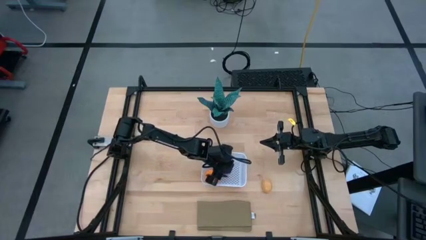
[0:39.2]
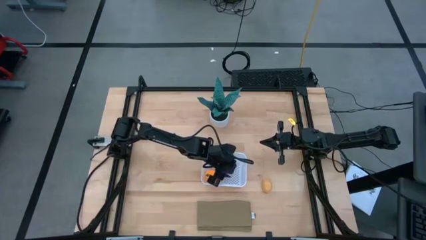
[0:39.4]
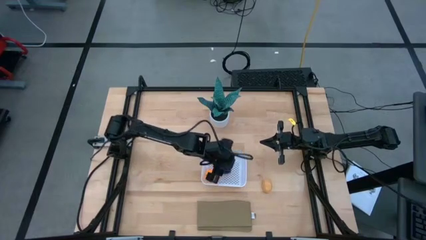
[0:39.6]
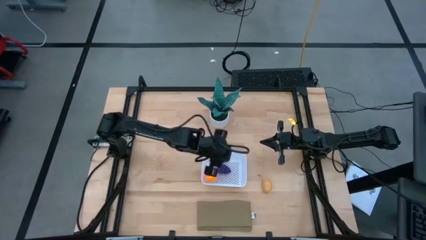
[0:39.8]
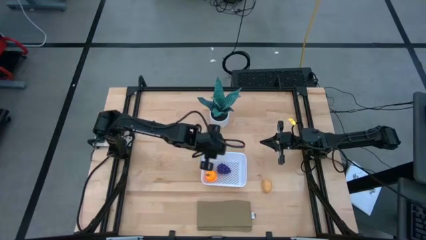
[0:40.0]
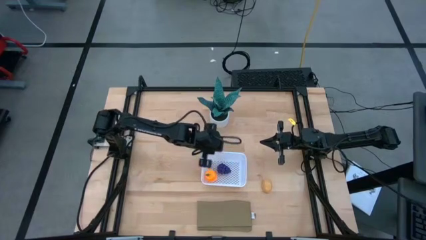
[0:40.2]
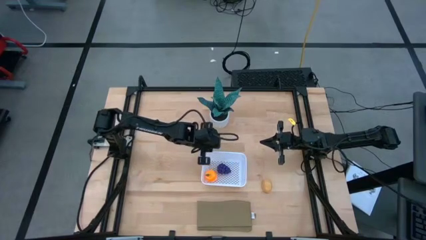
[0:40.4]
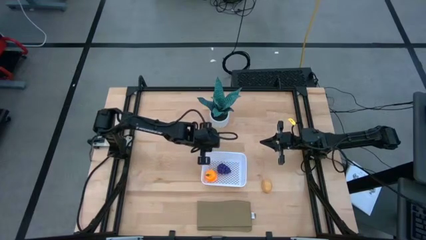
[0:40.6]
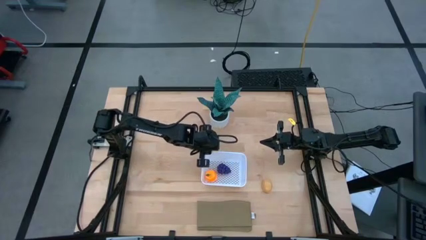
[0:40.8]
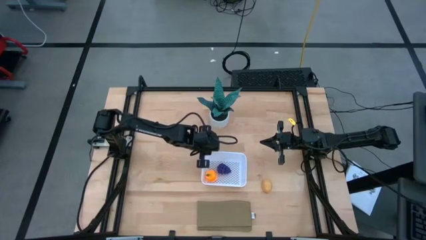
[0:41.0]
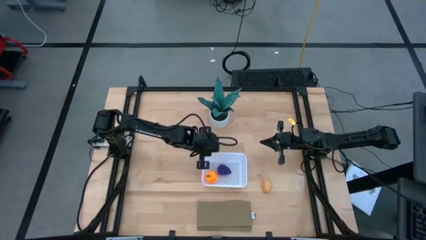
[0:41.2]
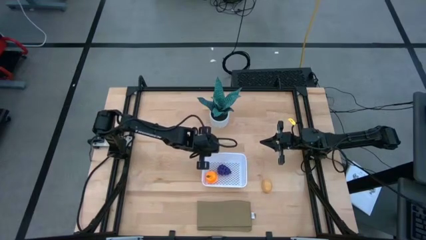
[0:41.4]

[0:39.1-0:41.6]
Task: Pick and placing Produce into tupperware
Adjust the white basket

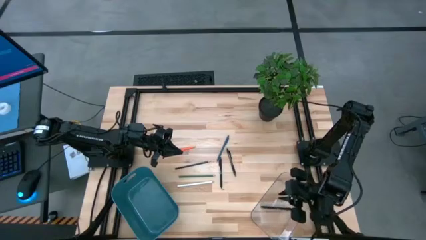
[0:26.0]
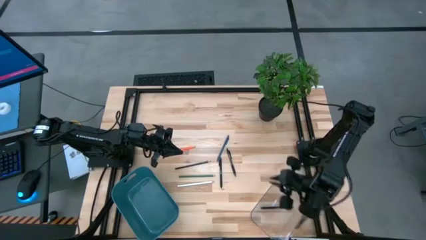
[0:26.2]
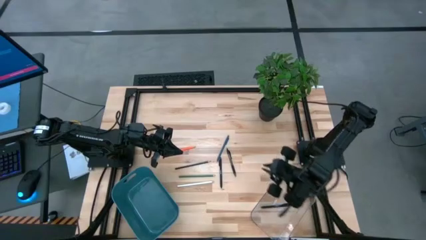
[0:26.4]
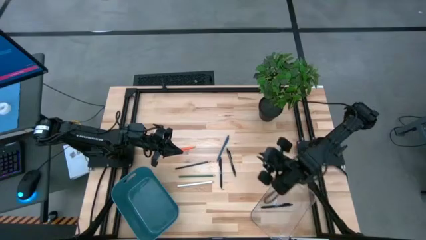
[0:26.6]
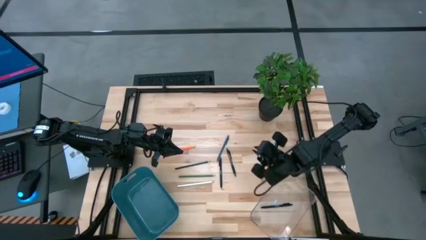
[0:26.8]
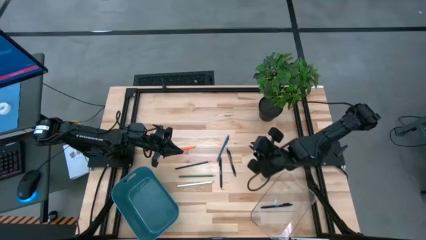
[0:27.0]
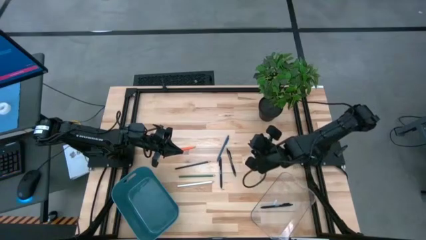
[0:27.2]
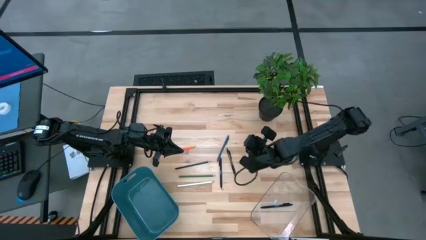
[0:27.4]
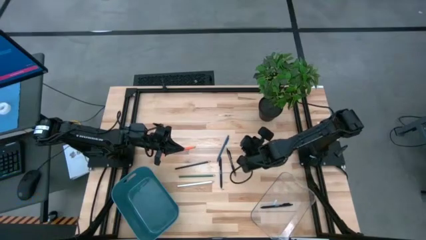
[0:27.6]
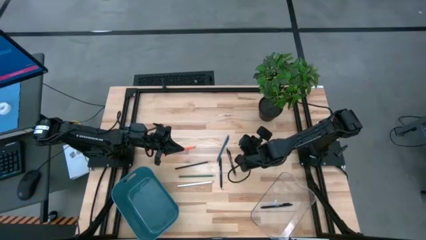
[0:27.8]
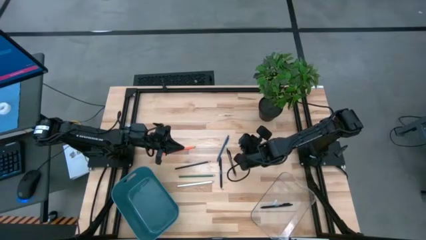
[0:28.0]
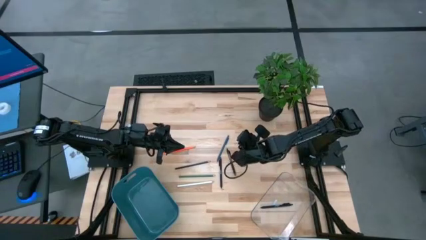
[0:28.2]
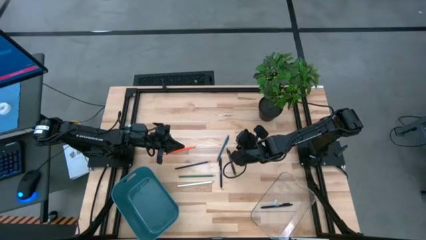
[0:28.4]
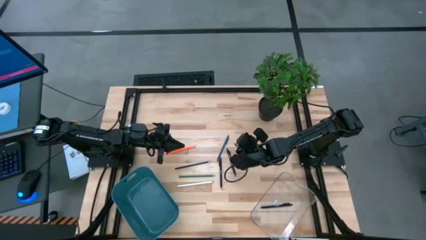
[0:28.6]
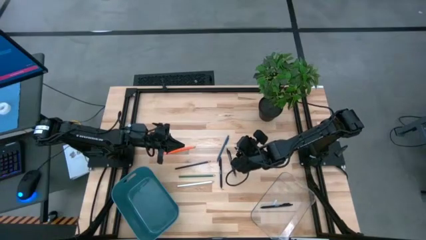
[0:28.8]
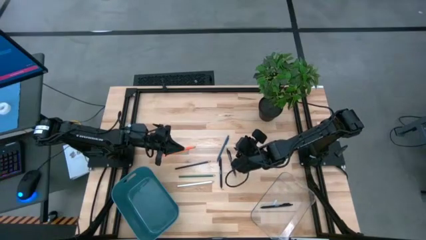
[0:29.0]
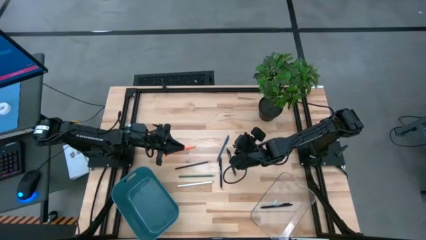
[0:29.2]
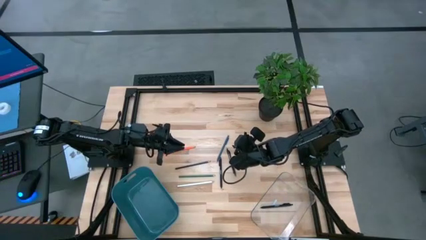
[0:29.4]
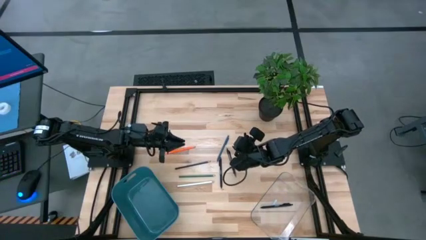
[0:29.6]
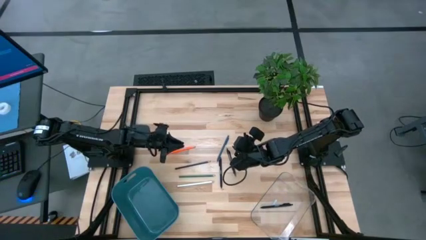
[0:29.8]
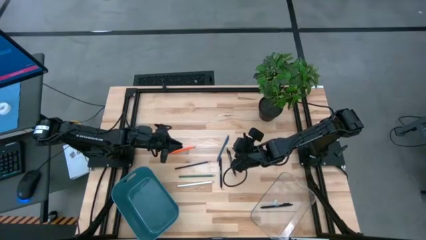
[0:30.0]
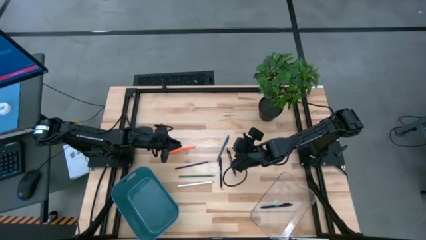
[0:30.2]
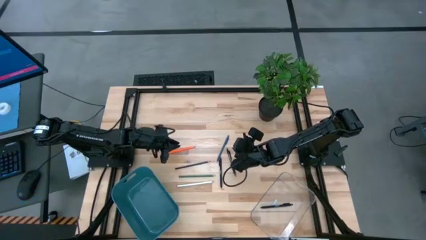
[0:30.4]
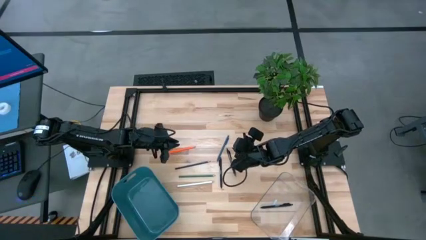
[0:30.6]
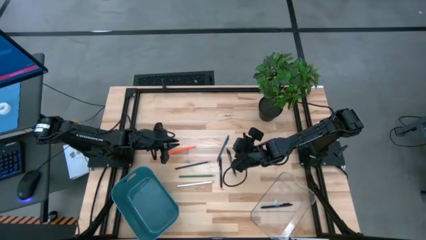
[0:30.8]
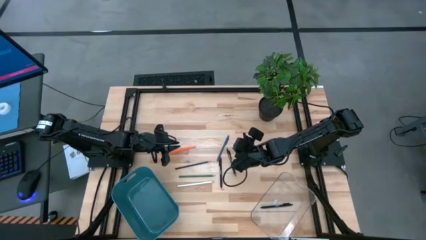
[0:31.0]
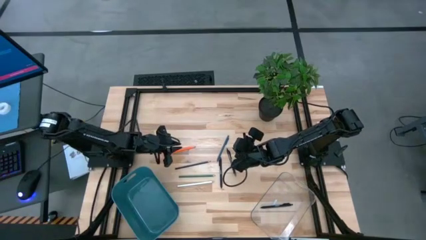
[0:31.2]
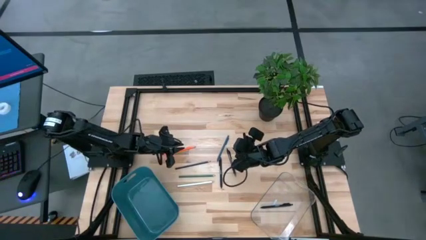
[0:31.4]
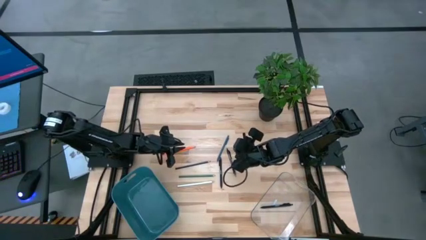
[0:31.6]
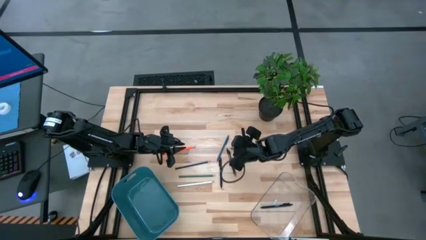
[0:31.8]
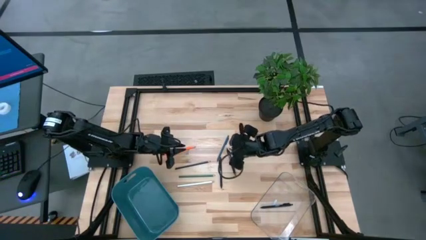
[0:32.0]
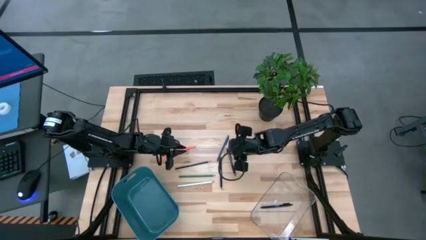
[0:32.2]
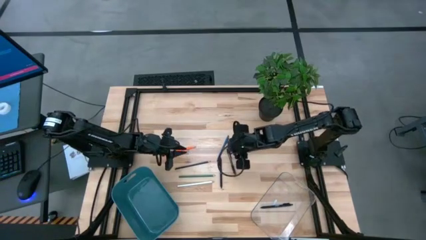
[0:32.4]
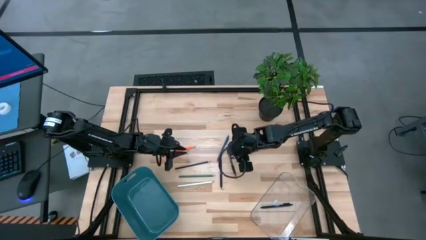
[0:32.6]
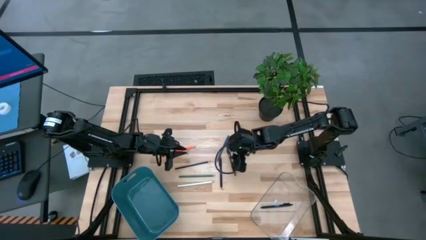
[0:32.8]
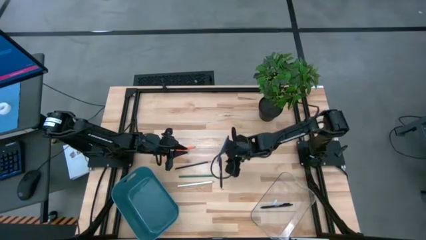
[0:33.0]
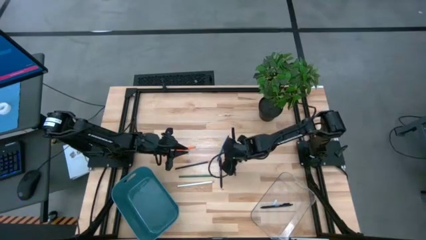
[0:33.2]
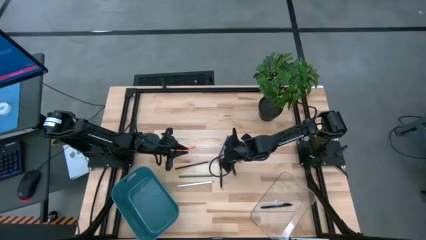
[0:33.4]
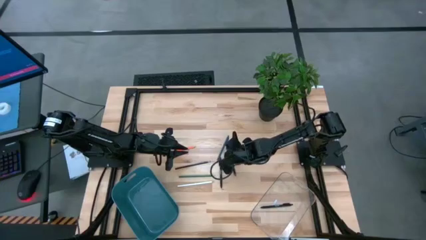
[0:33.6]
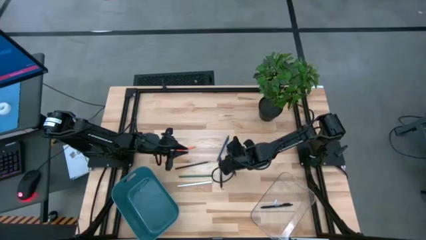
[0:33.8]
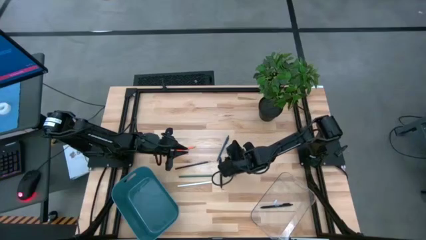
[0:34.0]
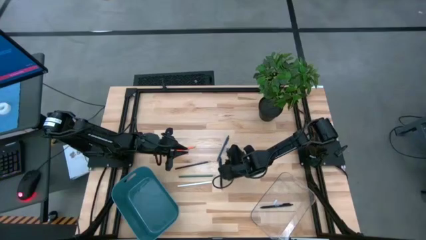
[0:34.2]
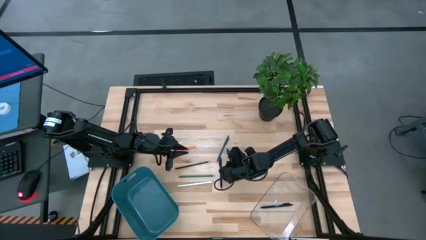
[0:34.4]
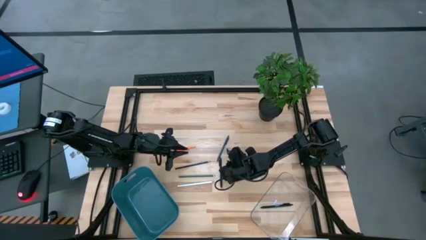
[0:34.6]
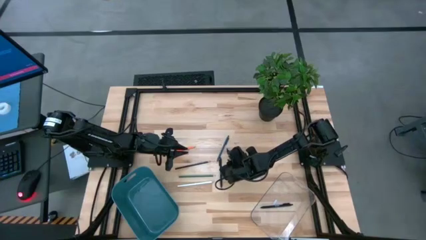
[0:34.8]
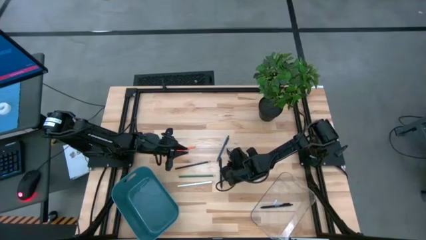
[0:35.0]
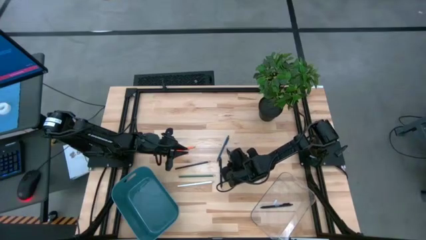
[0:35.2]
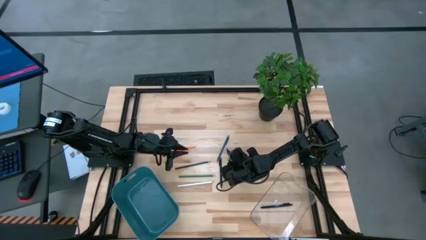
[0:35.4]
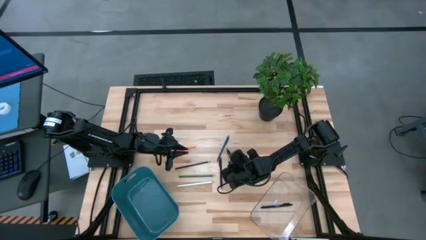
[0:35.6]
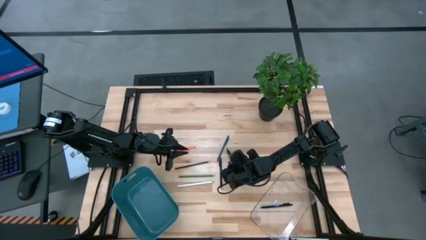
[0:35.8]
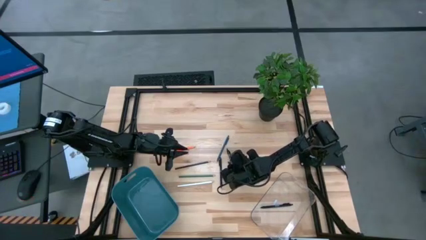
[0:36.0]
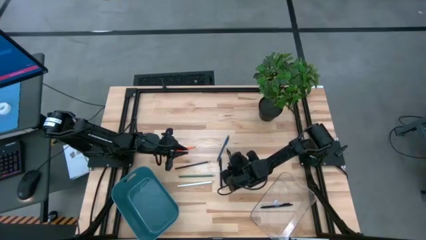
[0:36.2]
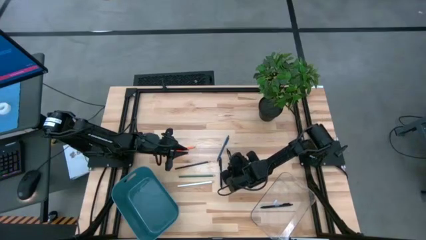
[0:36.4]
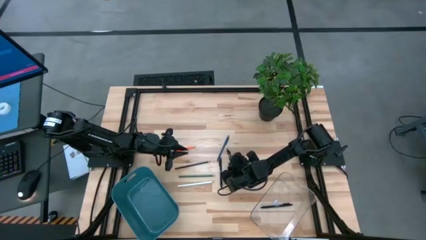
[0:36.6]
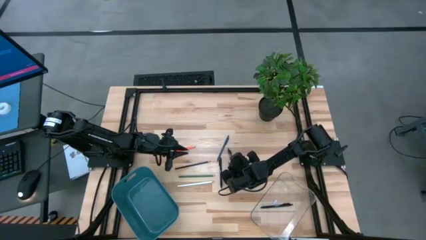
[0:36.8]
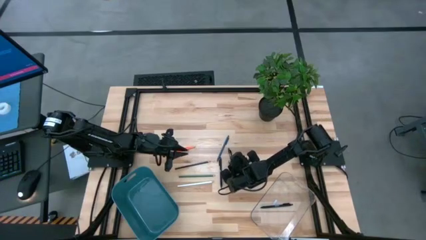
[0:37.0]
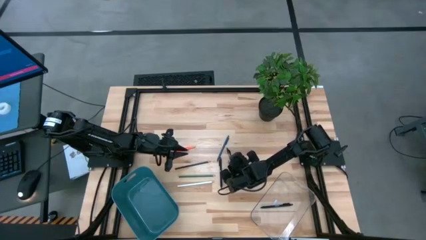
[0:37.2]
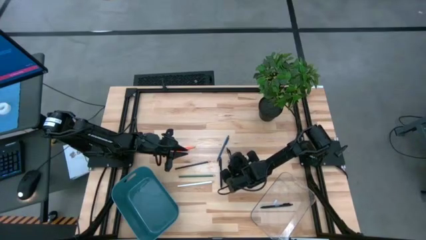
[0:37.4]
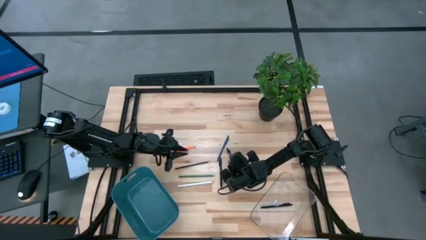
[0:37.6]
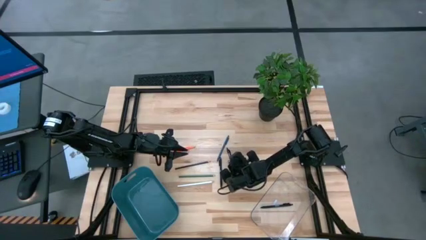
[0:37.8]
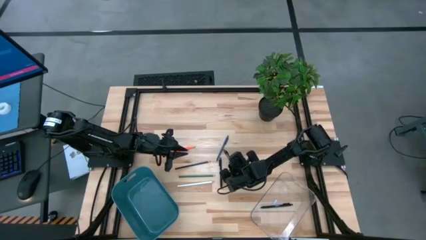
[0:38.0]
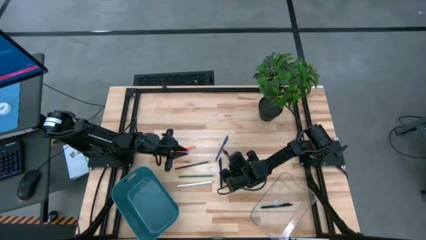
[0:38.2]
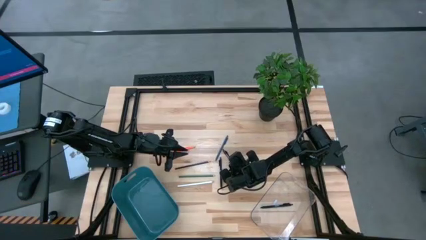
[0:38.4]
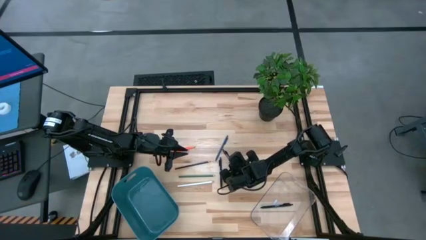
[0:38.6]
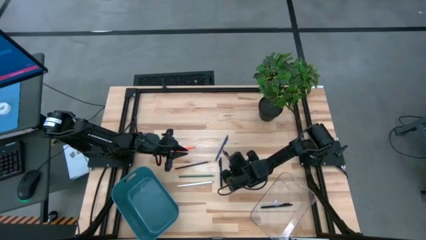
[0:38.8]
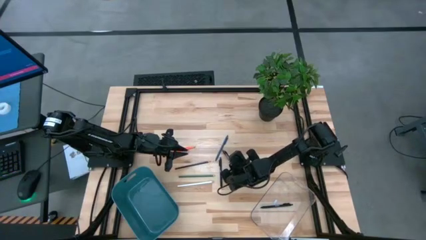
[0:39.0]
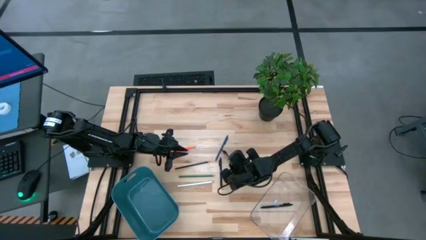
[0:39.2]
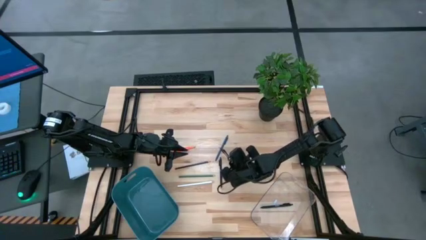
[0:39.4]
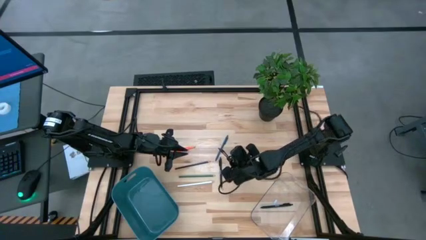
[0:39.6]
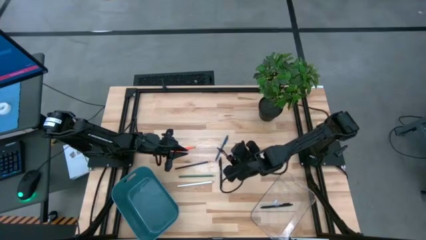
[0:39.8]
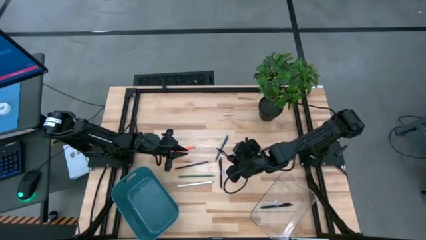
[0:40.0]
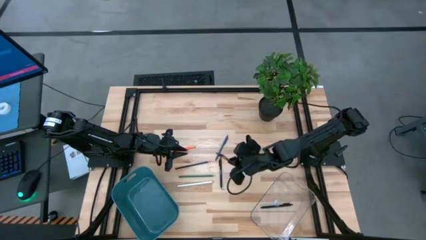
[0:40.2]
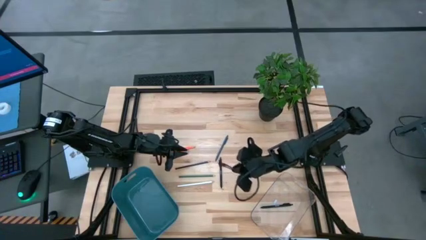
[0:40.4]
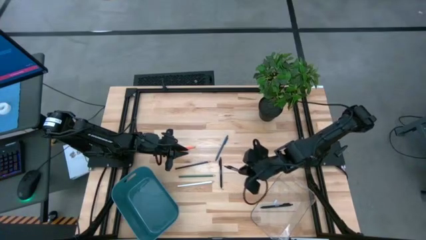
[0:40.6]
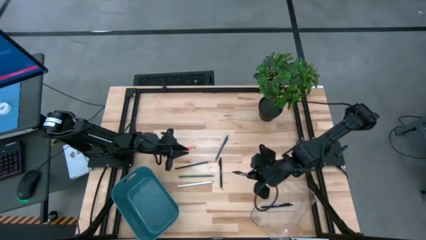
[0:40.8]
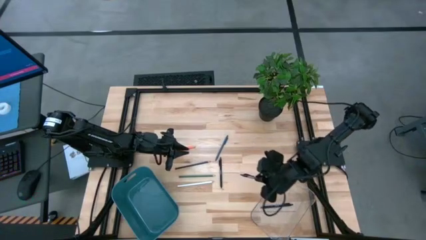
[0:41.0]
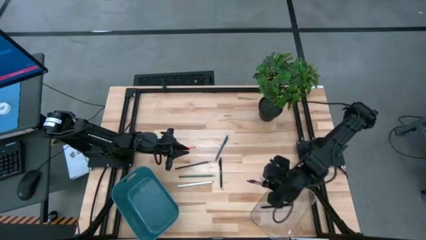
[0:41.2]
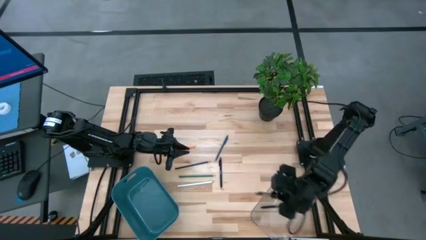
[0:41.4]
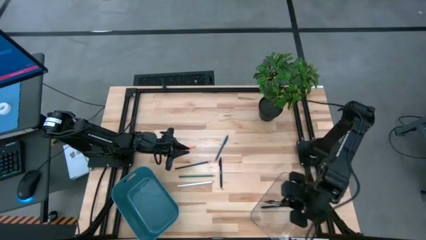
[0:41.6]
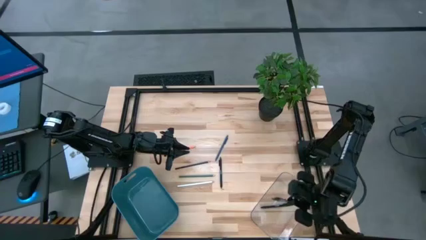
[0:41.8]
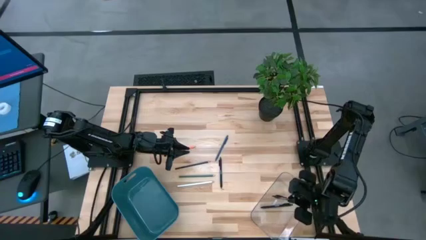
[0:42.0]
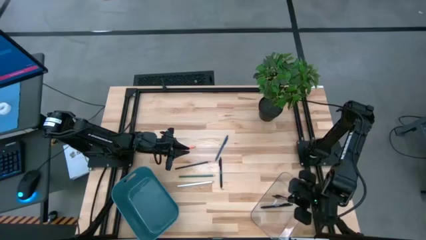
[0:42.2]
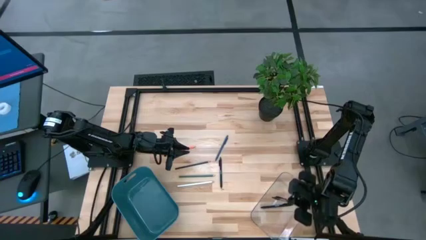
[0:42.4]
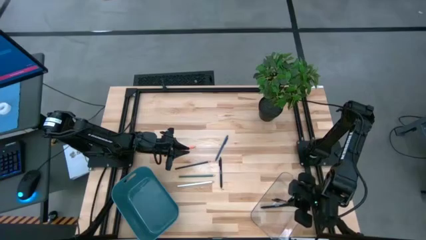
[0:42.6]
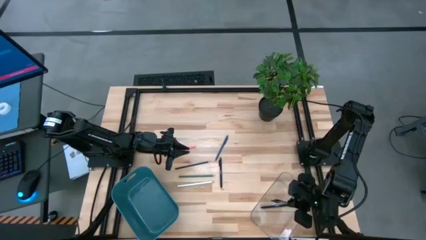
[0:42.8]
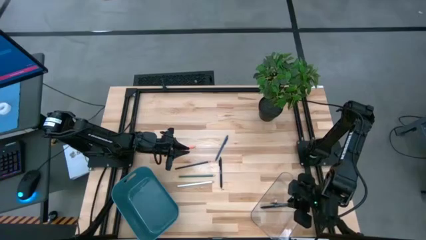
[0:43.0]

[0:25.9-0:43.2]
Task: Sort pens & pencils
Put the right black pen in the transparent bin
